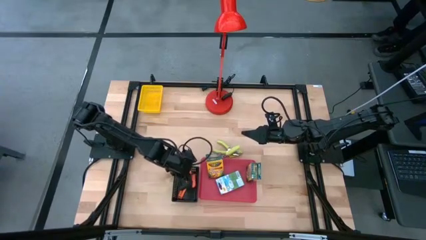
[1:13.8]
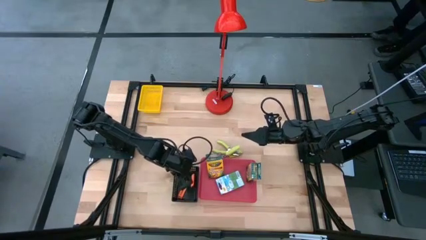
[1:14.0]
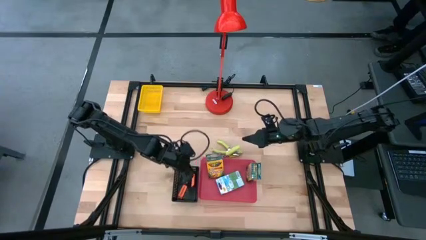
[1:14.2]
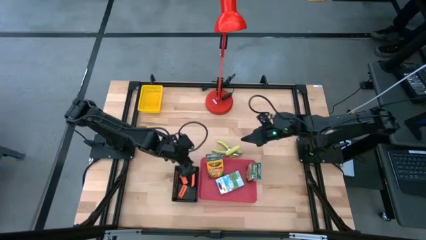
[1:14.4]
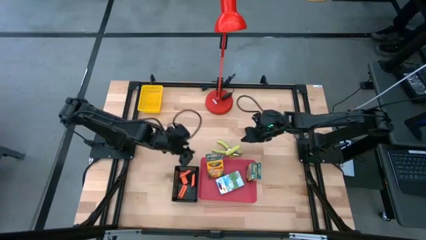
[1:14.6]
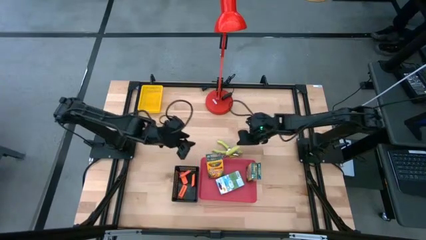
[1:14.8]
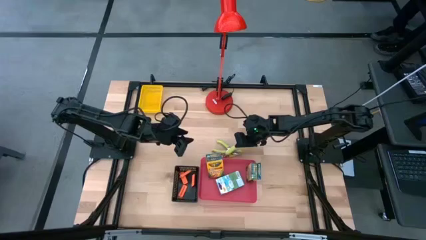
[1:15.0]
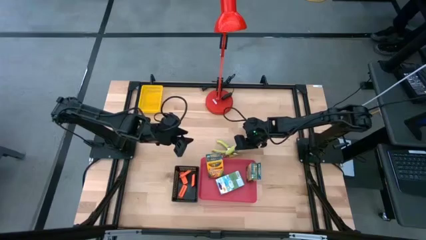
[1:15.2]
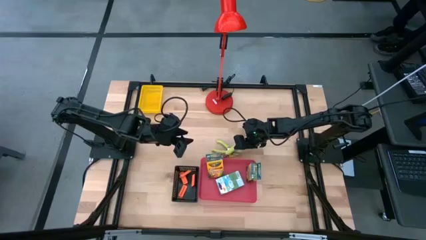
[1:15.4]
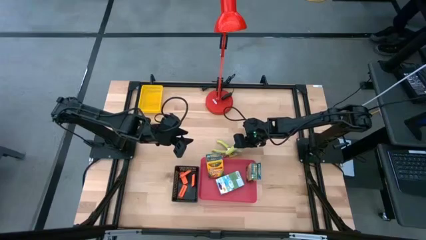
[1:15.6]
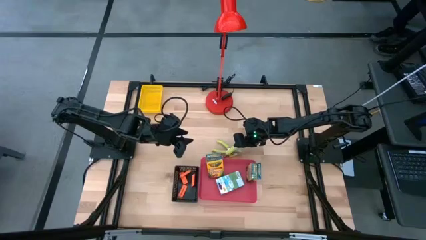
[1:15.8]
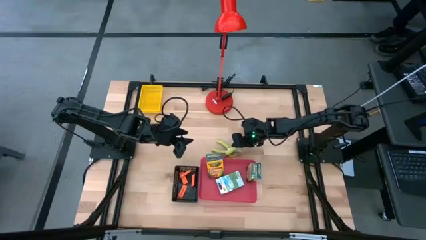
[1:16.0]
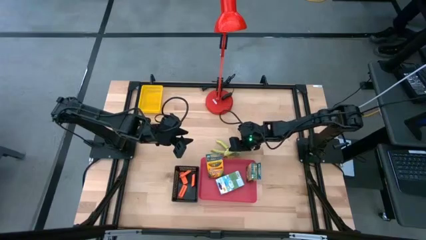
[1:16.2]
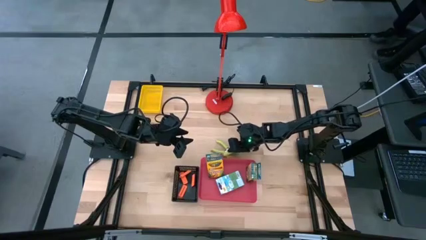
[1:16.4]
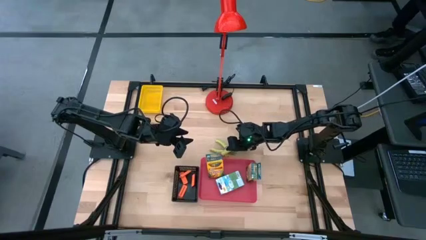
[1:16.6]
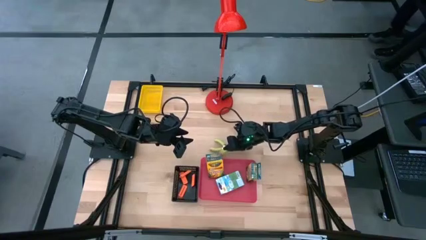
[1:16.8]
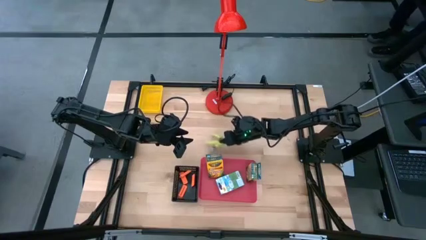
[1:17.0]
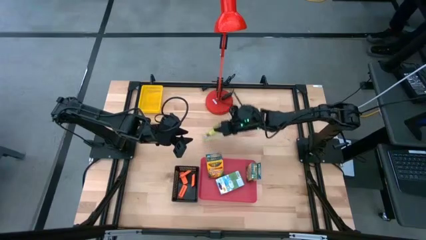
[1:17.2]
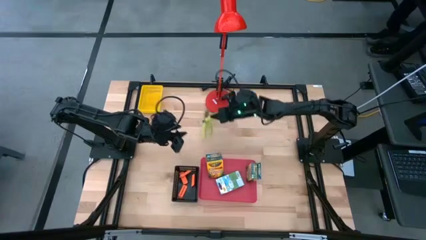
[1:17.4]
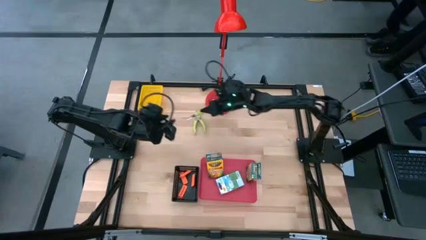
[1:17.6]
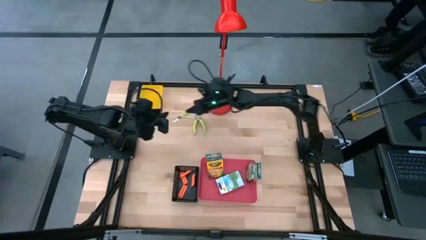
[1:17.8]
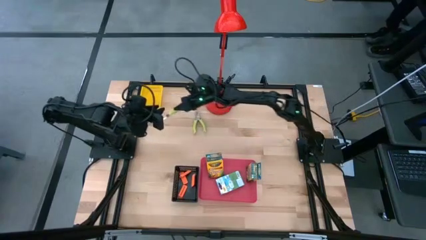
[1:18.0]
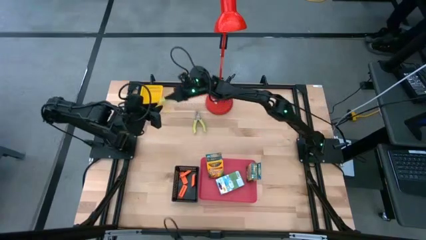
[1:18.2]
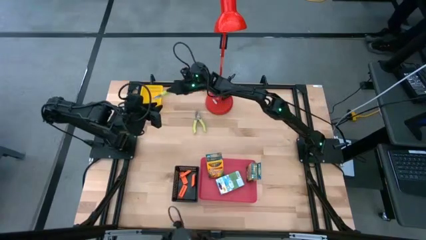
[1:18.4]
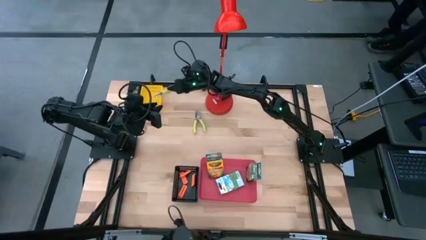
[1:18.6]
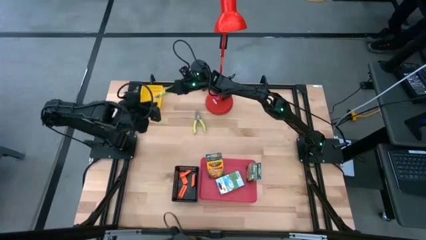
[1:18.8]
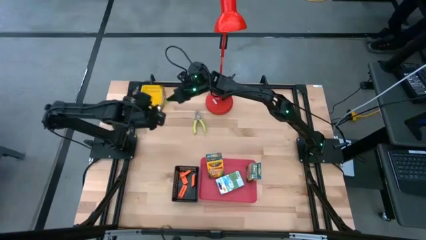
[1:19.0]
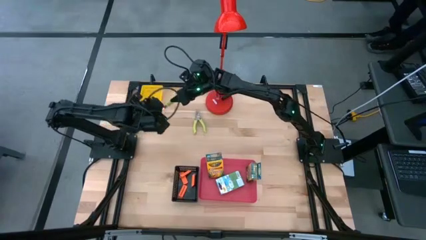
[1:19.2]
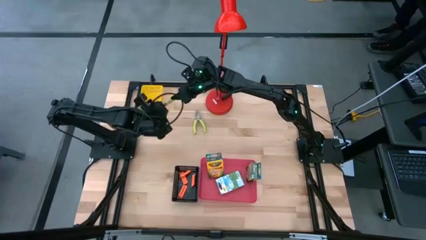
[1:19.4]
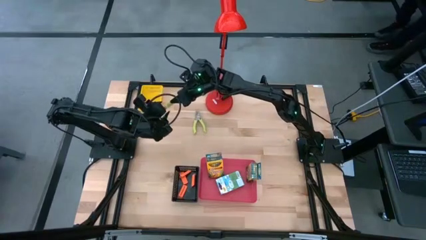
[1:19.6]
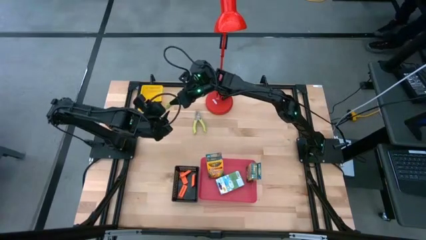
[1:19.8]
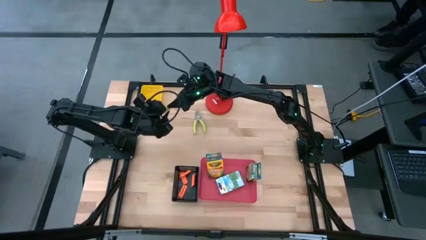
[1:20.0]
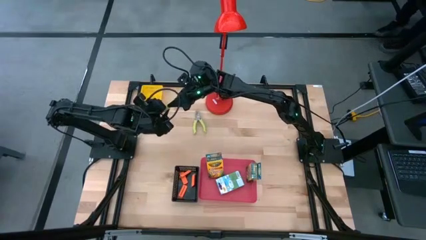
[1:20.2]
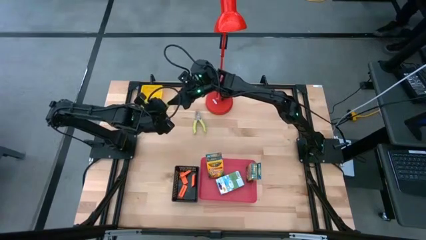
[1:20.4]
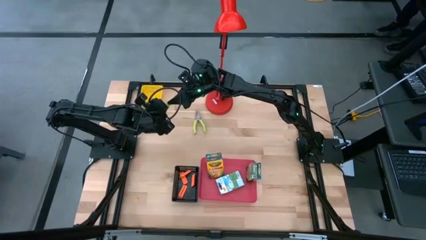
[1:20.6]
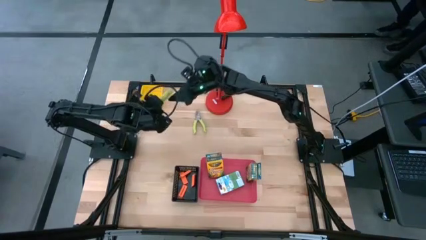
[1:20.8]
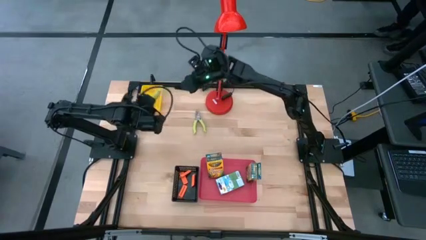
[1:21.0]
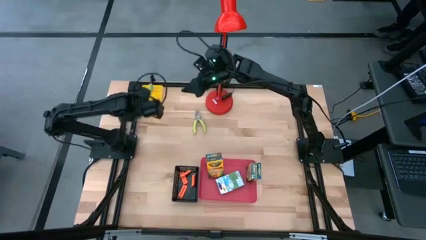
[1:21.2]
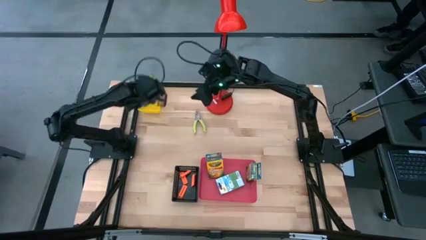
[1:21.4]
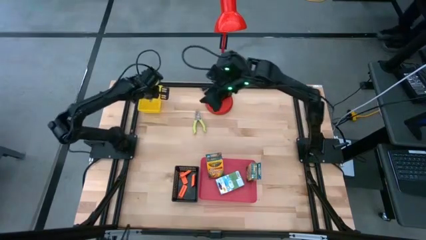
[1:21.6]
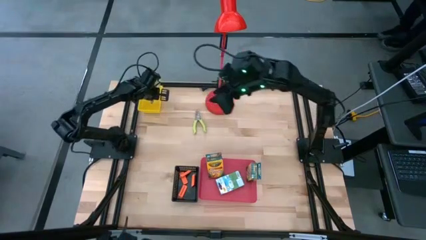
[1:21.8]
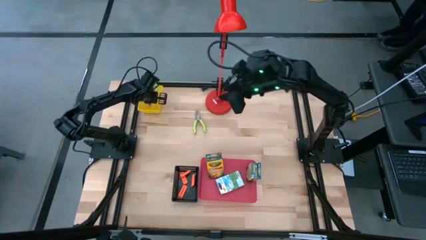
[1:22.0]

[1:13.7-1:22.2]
Task: Pick & Place School Supplies
Put the bottom green puncher into the yellow bin

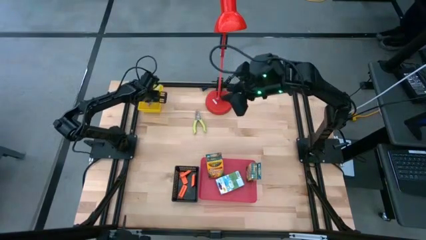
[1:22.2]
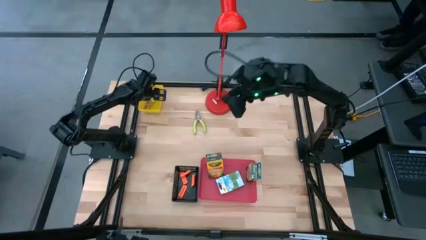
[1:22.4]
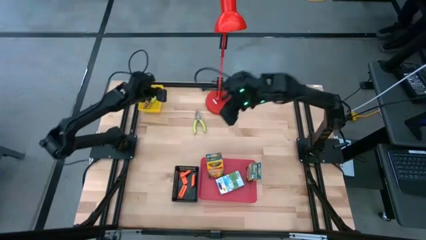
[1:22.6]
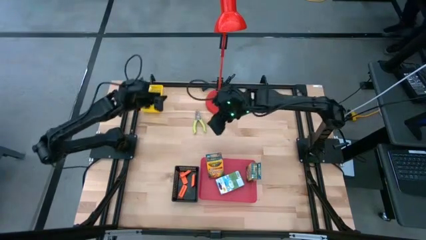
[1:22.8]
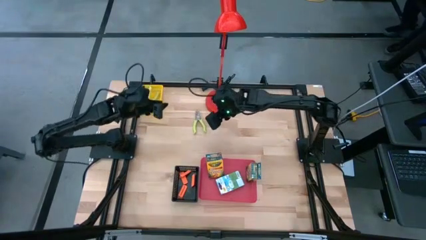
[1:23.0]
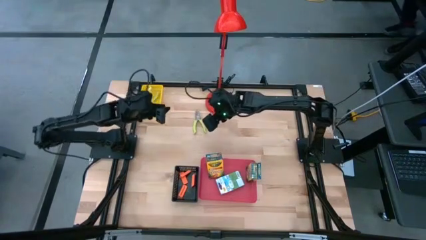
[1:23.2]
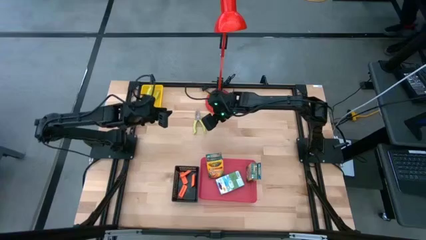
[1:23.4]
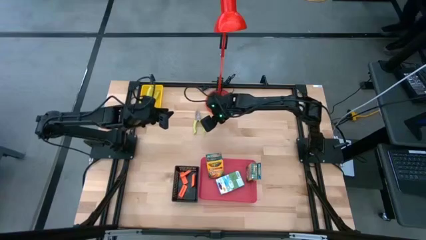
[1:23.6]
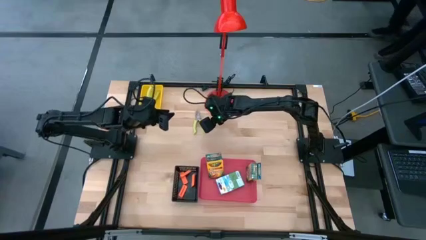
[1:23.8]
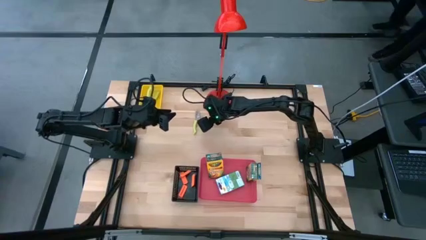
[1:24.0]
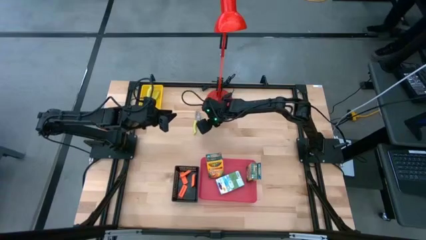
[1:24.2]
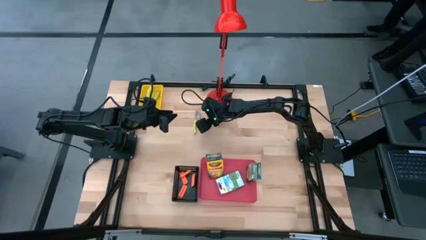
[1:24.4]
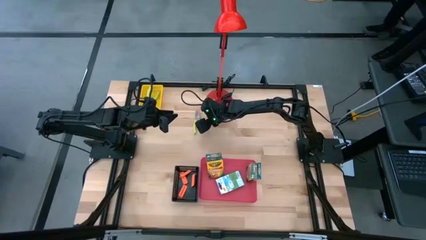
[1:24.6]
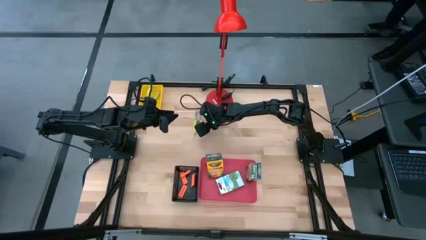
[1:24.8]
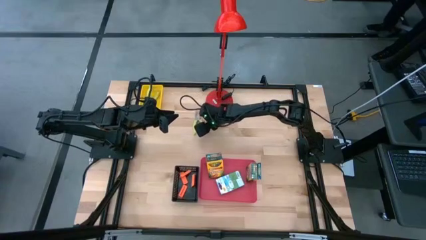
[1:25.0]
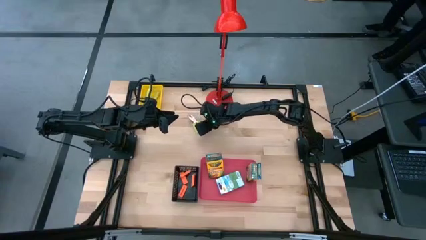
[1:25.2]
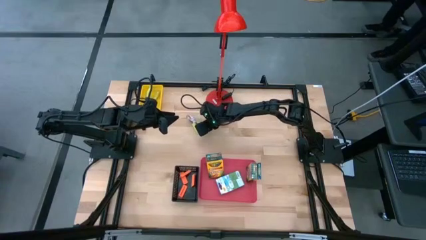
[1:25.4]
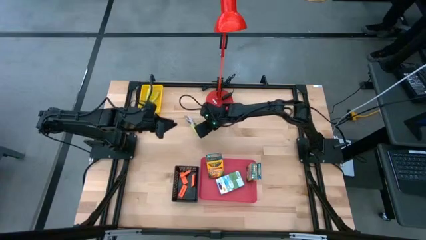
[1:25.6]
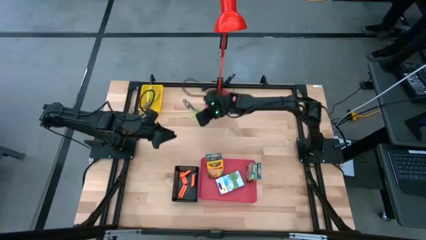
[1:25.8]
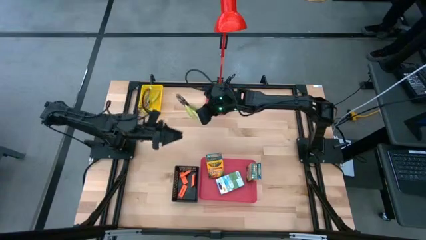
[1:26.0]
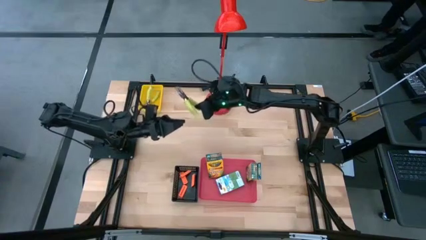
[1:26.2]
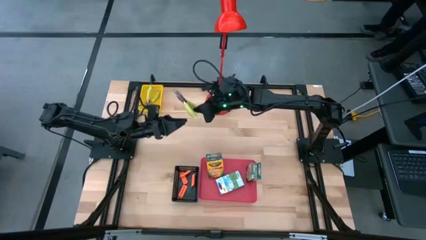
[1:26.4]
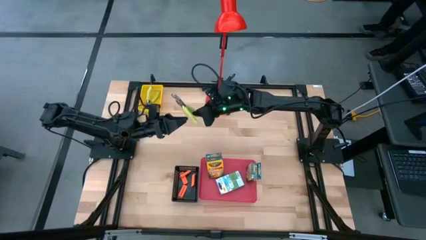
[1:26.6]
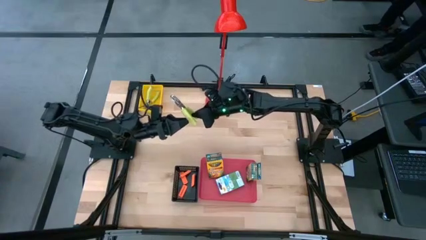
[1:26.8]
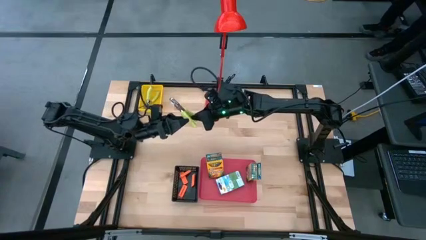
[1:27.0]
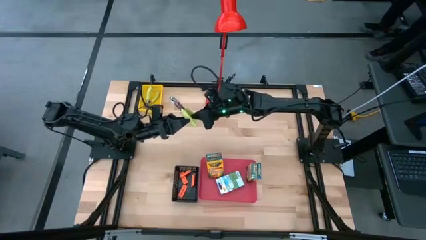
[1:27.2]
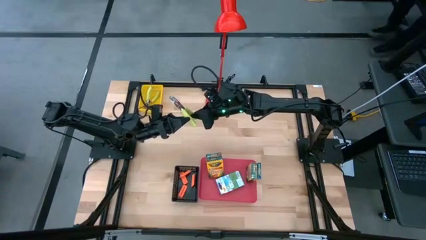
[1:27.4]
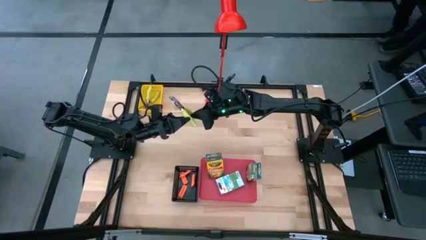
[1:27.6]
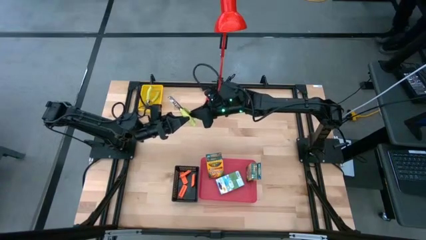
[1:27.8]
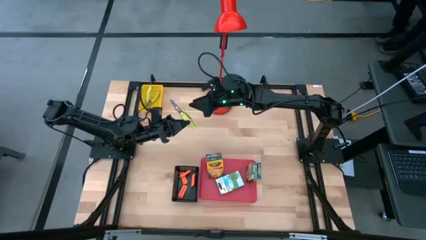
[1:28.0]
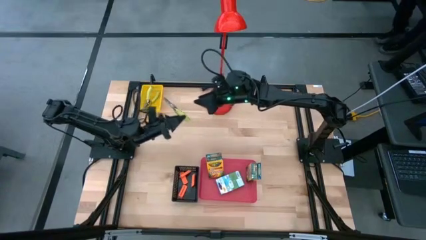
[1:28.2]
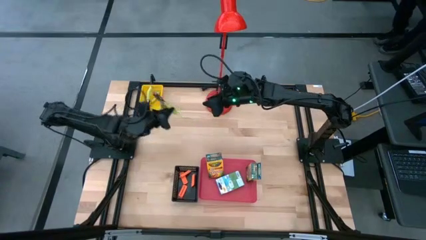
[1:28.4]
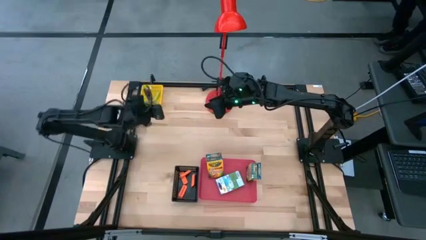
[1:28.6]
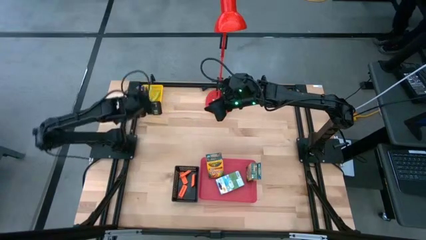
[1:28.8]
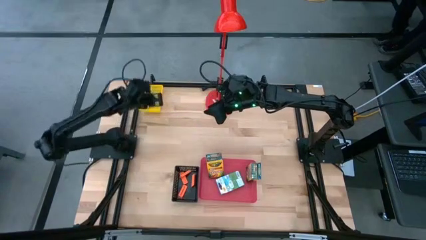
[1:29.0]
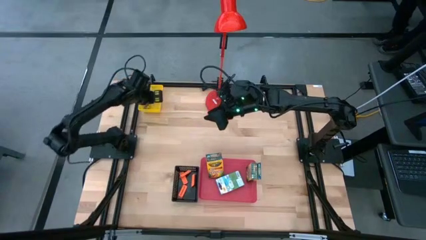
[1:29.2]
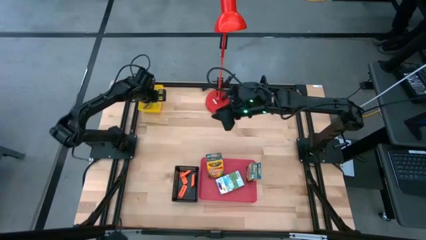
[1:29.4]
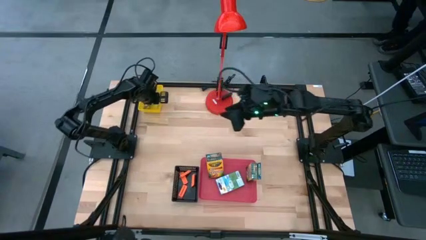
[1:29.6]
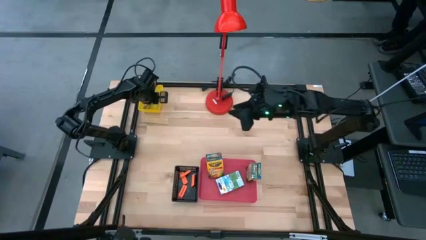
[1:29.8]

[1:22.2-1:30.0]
Put the green puncher into the yellow bin
